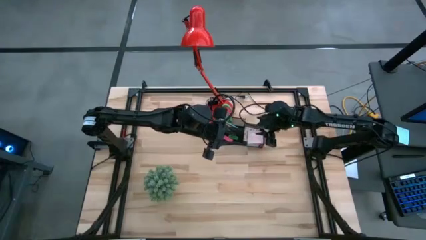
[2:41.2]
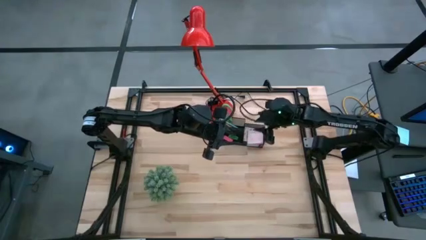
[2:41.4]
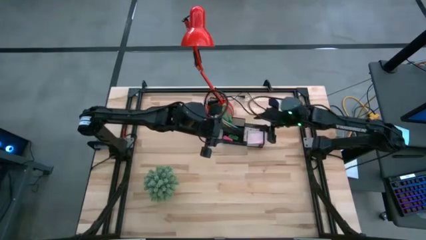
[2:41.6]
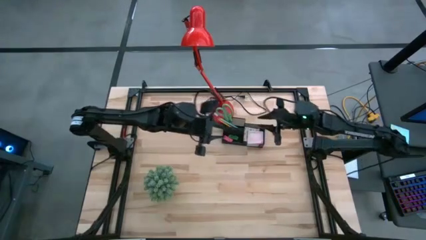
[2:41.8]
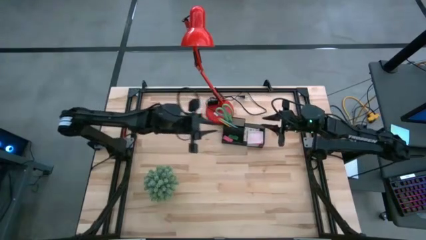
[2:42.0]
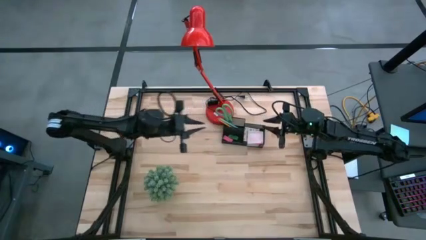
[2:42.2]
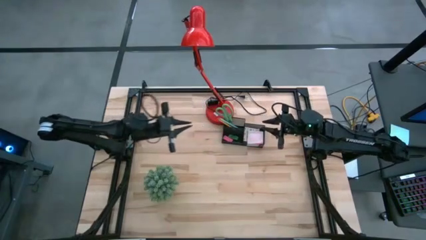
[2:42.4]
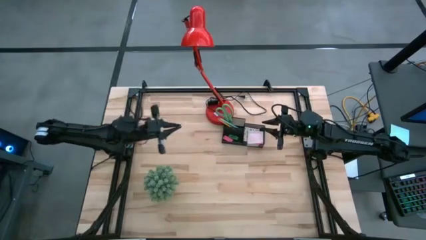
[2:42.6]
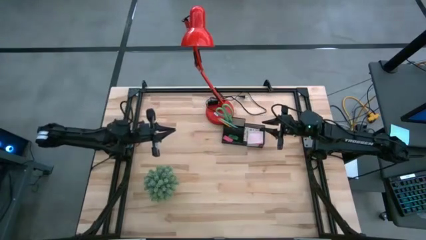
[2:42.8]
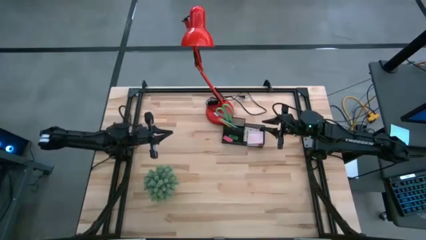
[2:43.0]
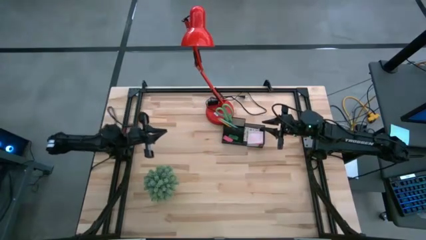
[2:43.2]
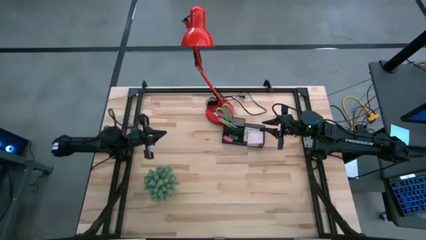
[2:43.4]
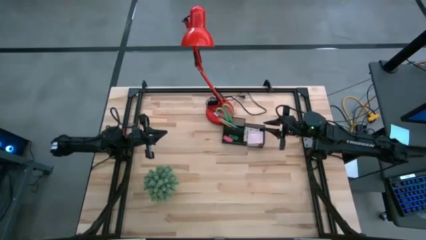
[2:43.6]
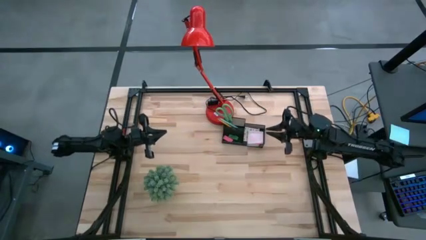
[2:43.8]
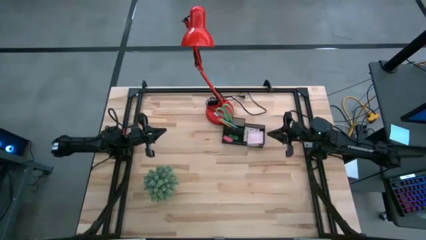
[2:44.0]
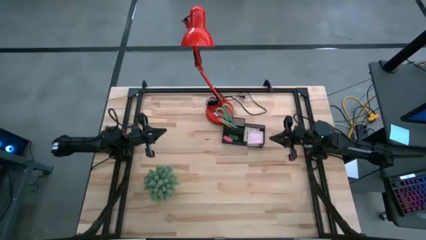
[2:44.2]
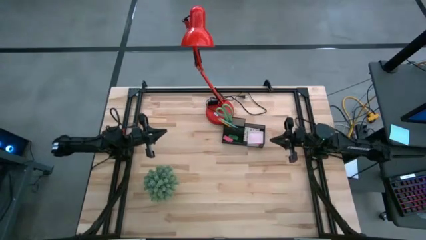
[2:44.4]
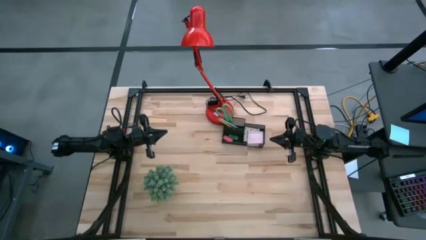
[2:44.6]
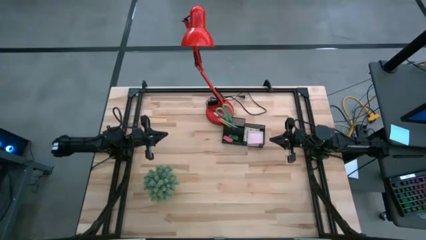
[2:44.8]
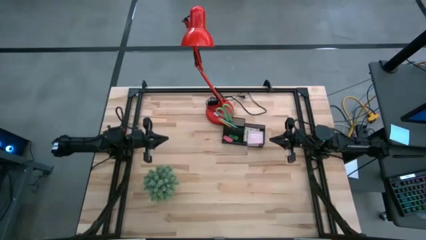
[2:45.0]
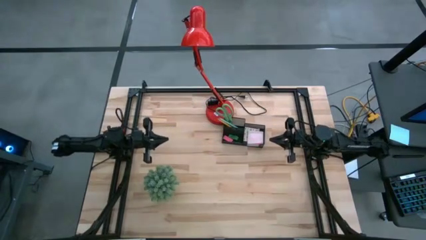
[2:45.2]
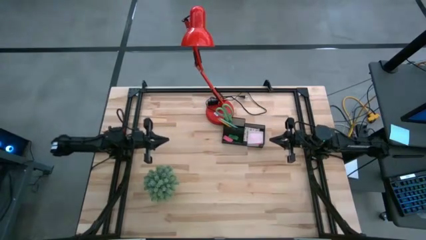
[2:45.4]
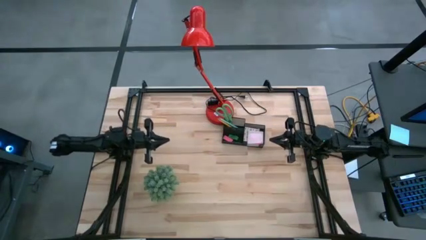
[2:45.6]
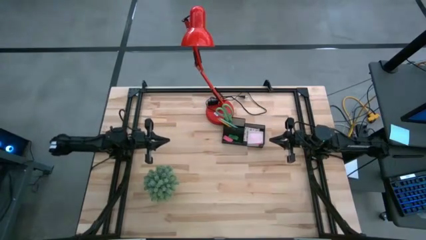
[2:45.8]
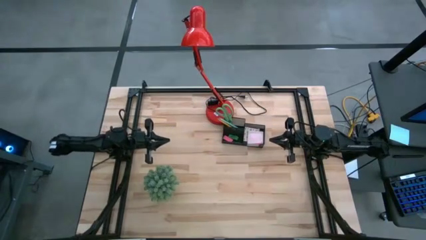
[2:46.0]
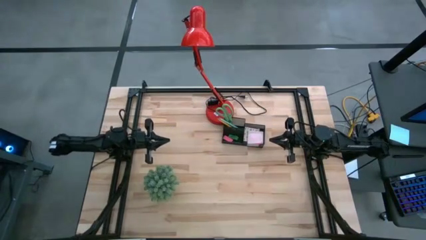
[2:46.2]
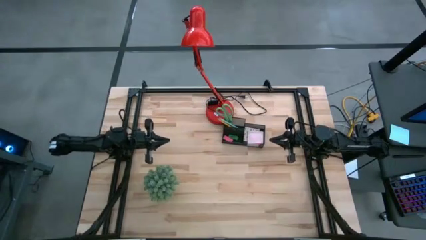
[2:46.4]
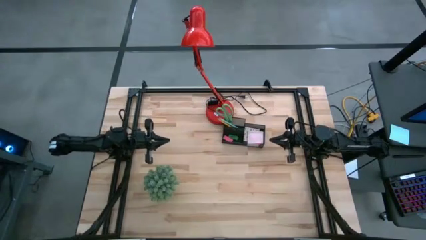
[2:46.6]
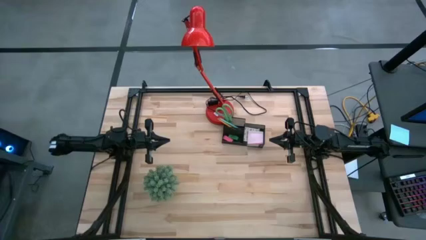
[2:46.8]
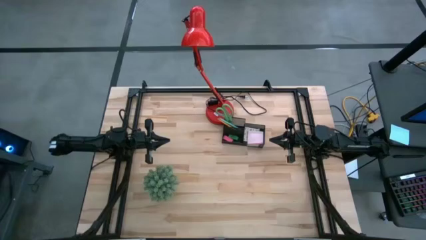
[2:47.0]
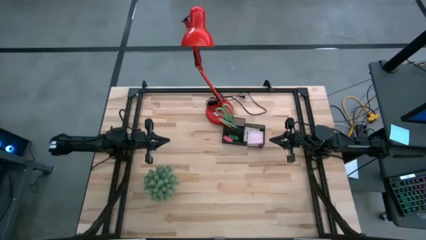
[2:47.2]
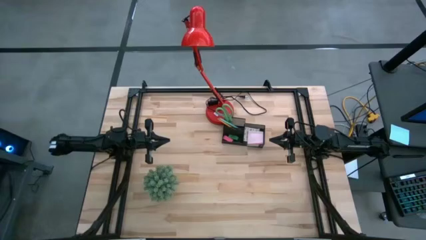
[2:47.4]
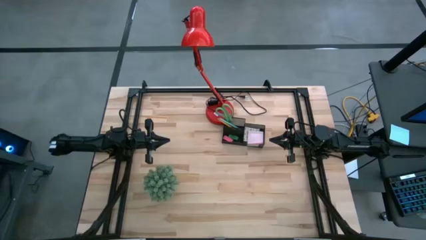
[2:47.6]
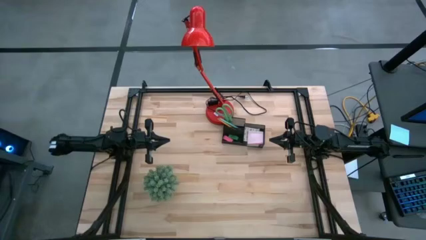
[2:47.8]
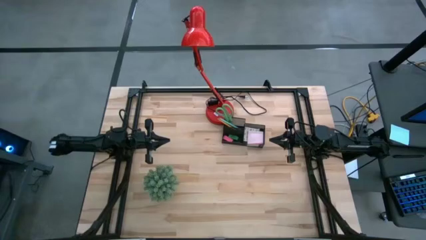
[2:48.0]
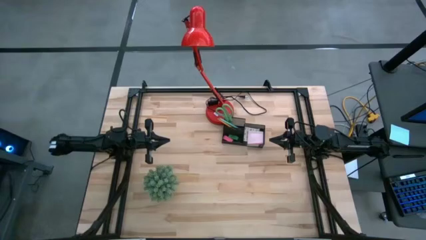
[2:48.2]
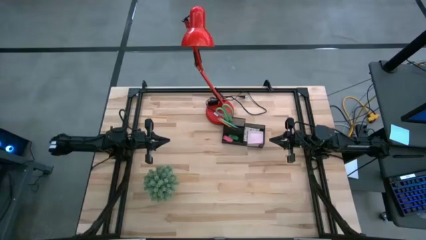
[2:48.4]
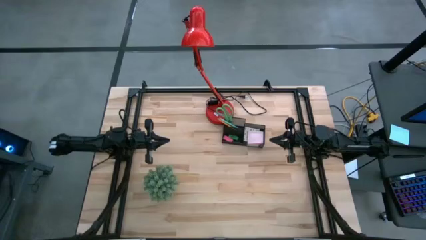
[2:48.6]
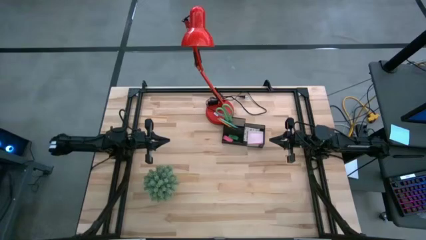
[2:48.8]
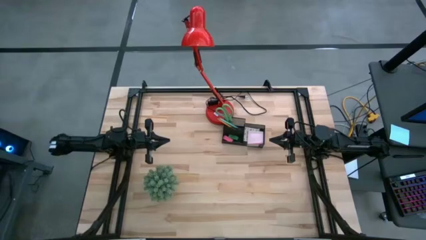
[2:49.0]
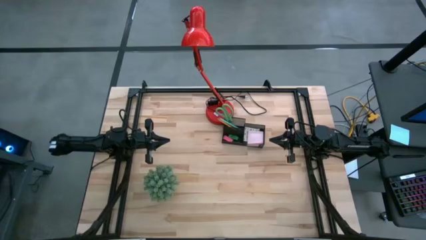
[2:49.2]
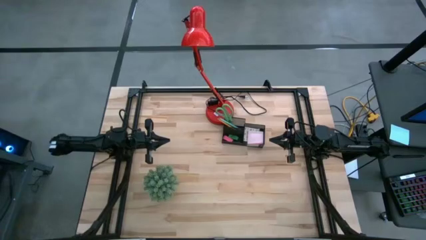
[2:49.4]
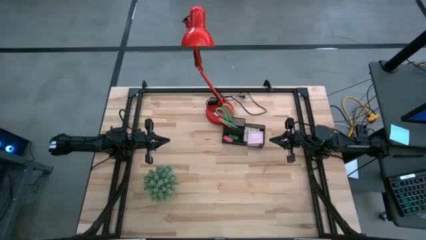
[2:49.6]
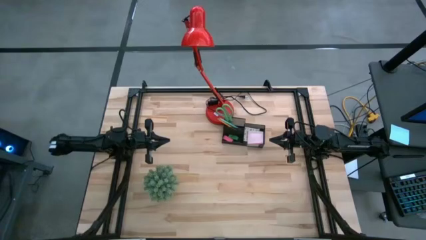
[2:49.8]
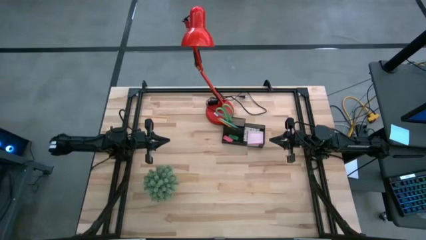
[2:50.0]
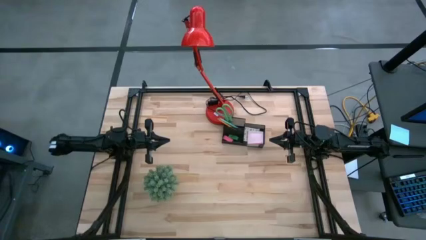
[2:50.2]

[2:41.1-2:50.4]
Task: Pick and place office supplies into organizer
Return to Home Position

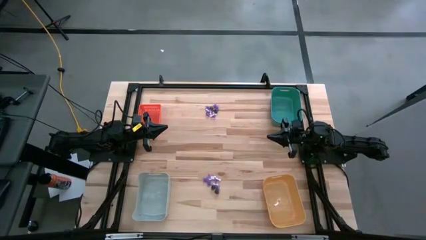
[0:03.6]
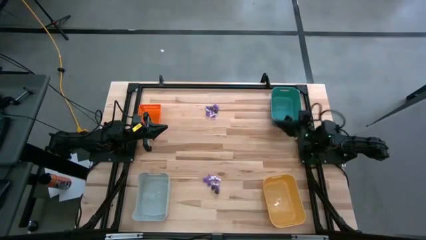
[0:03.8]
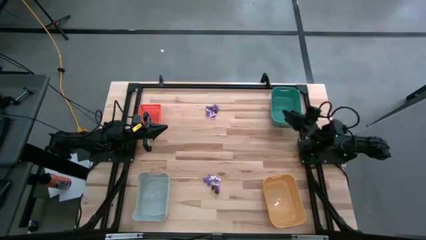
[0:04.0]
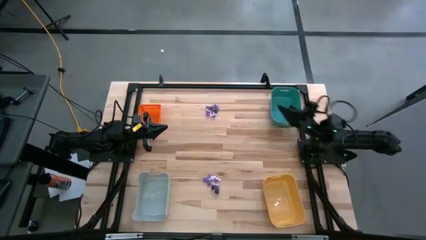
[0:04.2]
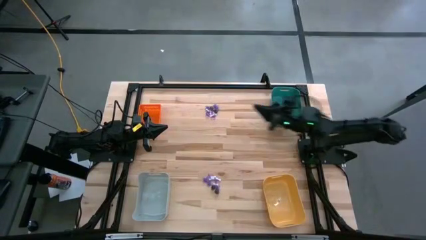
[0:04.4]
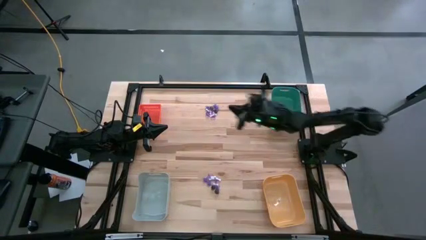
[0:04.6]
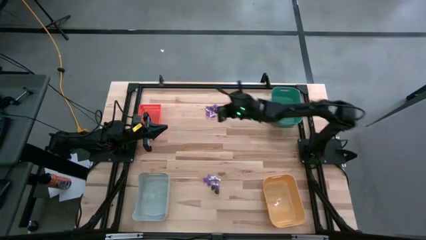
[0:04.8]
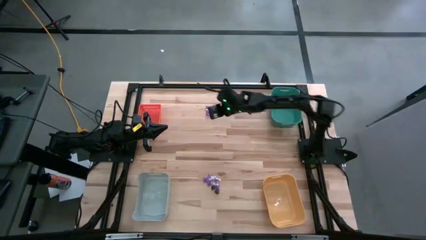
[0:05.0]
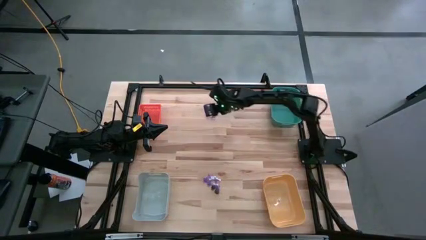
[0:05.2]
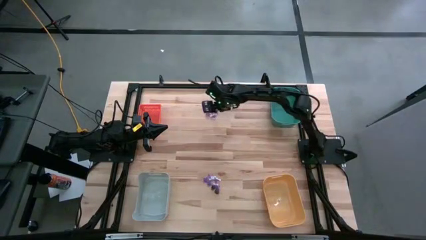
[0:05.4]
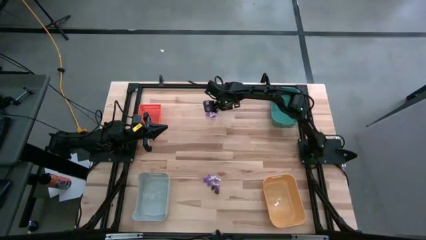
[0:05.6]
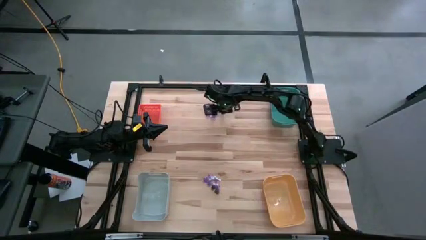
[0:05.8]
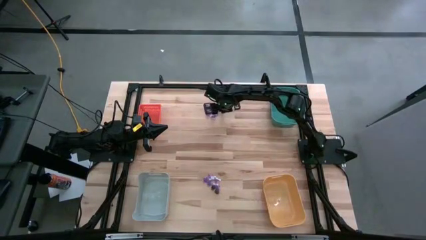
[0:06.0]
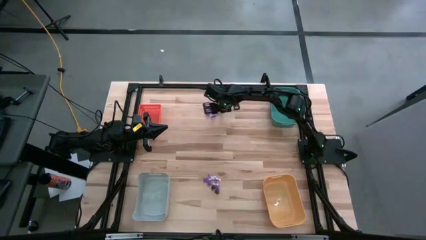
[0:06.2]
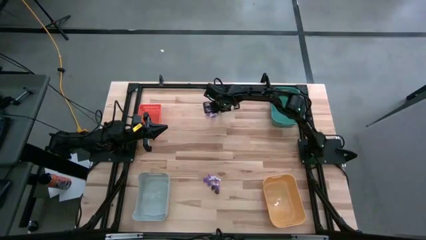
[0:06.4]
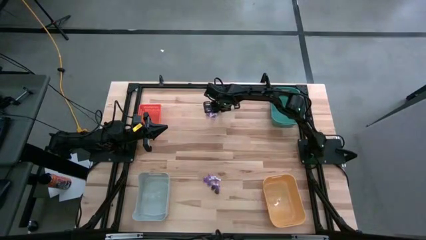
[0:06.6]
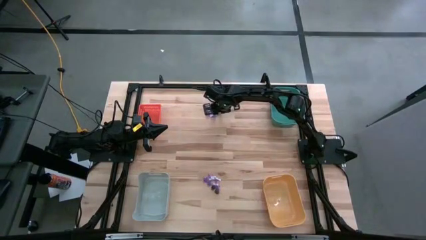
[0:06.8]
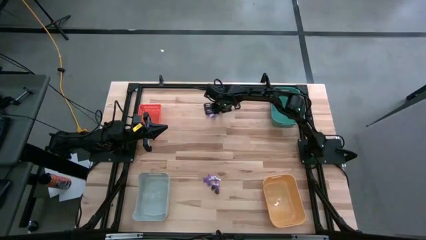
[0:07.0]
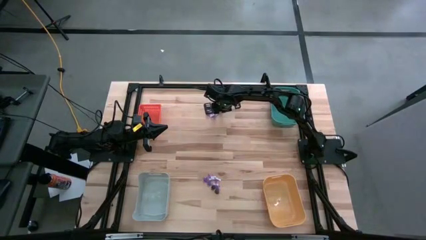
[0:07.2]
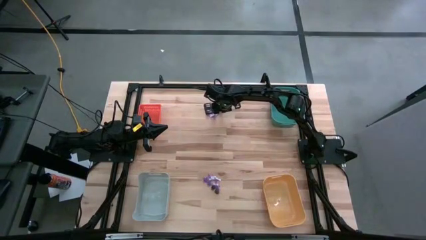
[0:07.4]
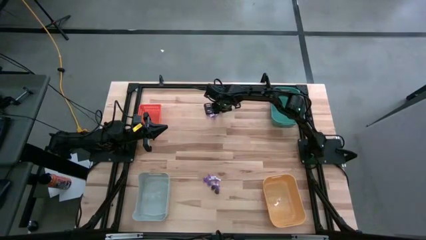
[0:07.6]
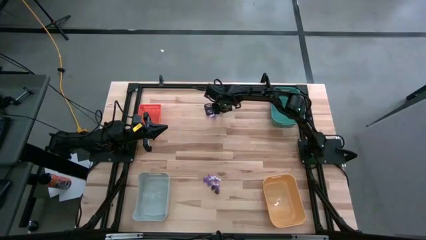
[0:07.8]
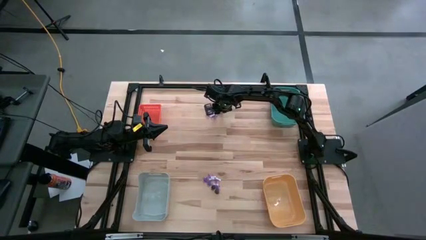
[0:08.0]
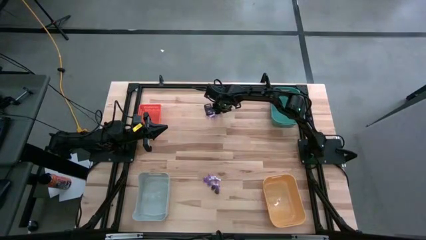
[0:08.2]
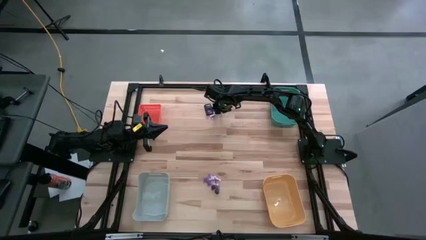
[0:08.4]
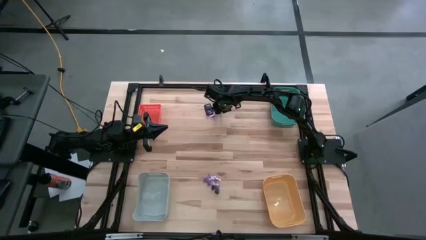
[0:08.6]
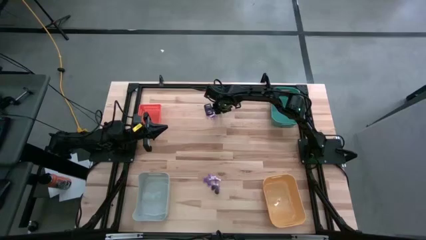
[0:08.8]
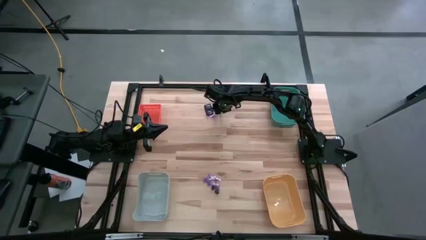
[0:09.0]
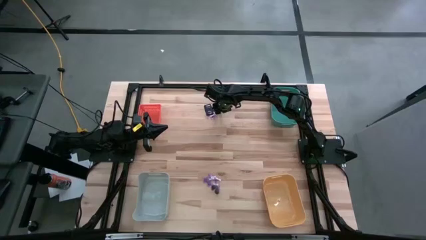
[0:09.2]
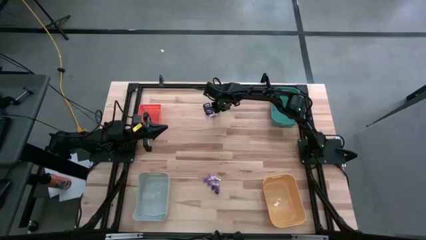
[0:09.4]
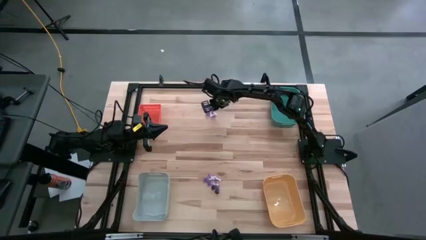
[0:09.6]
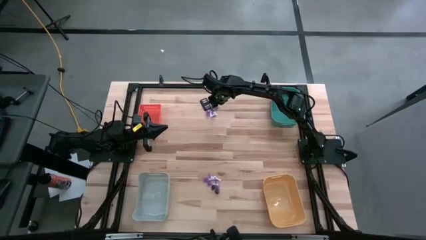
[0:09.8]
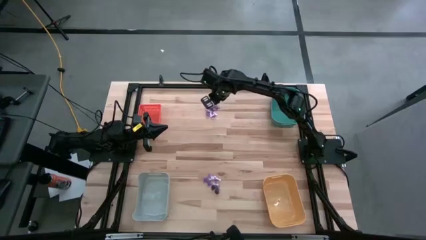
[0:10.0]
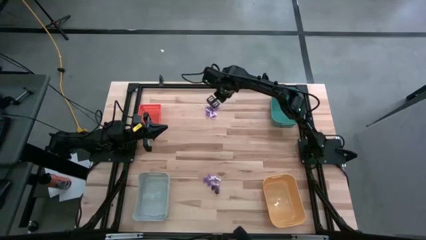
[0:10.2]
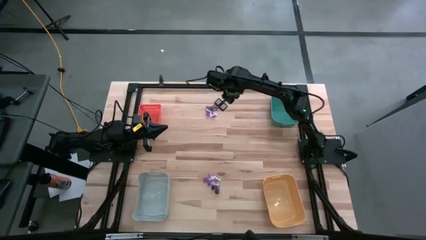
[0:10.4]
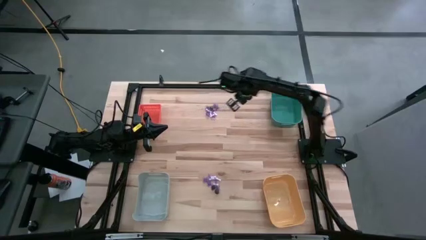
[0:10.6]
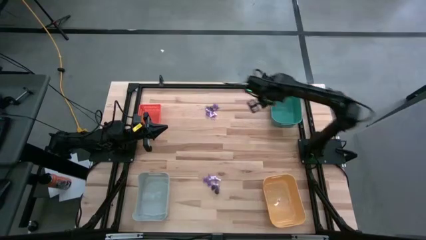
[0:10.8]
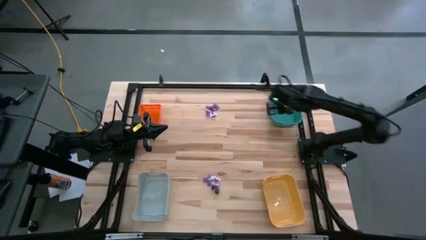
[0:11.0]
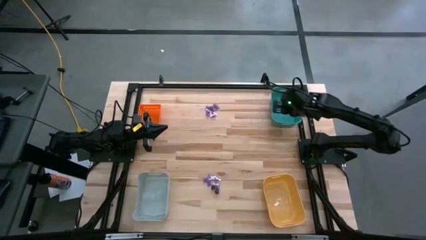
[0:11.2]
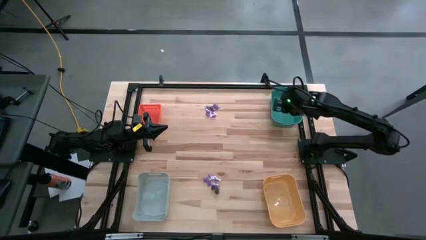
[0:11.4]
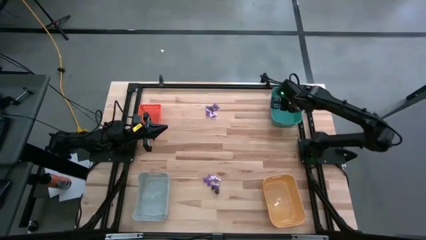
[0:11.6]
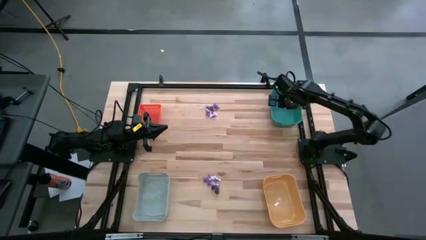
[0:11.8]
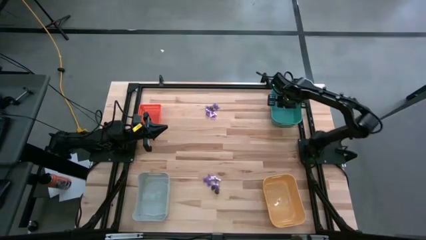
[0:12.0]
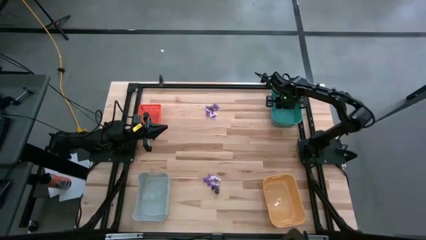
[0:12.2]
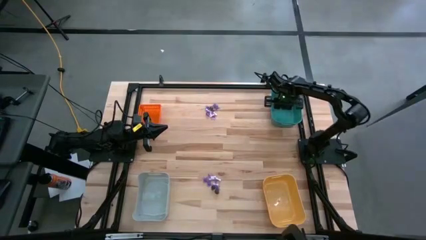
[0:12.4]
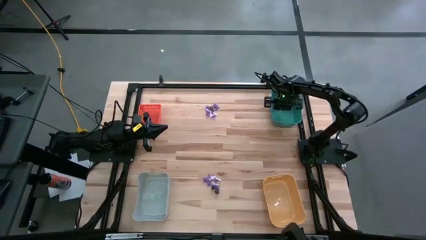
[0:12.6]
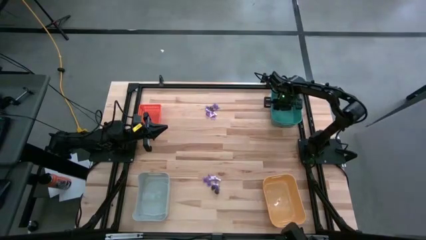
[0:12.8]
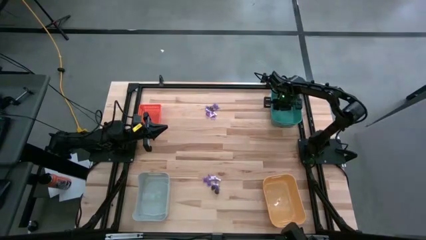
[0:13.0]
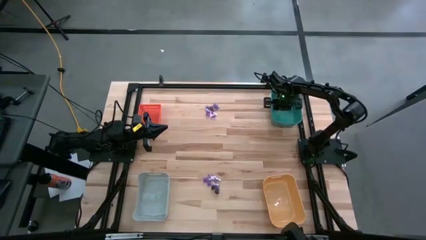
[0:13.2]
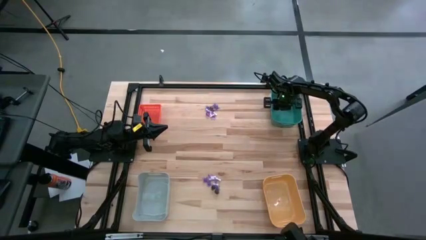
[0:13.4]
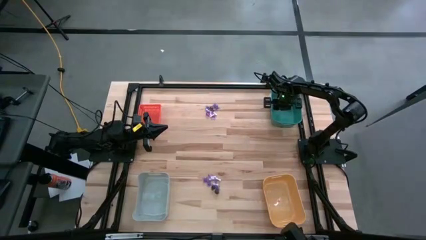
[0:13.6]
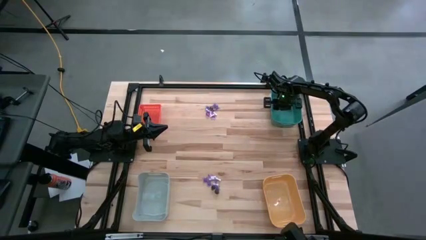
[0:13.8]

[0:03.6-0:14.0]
Task: Sort Halloween decoration
Put the black skull toy into the green bin
